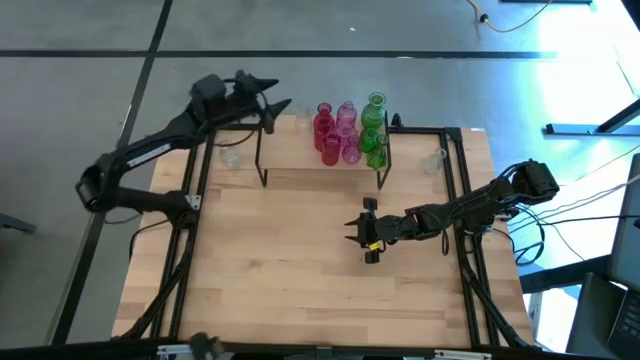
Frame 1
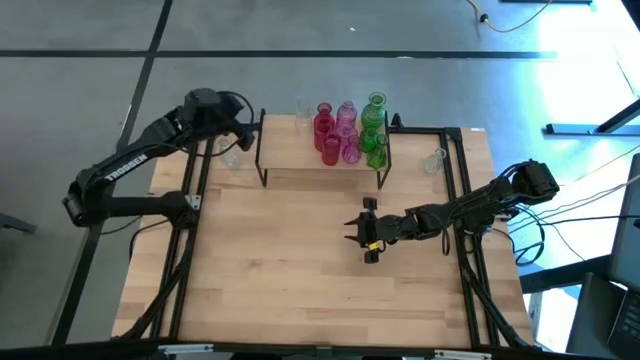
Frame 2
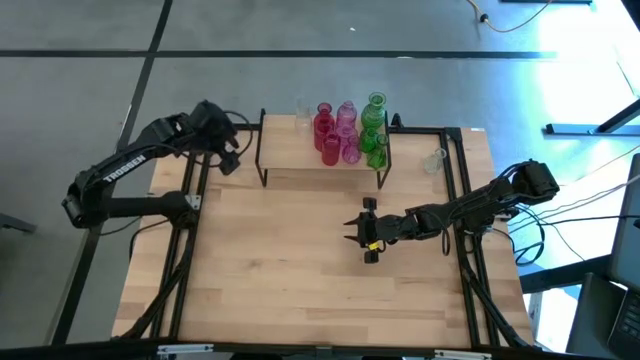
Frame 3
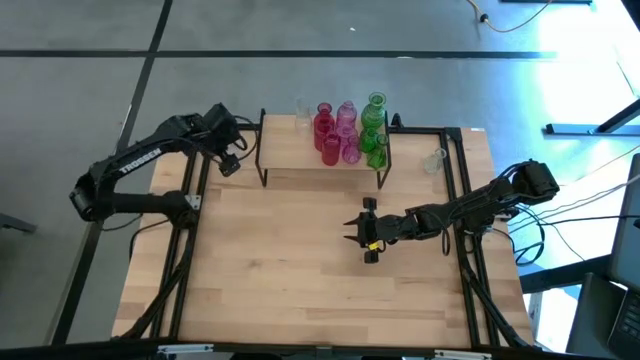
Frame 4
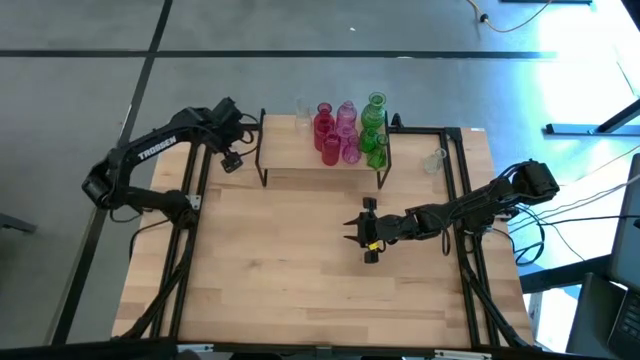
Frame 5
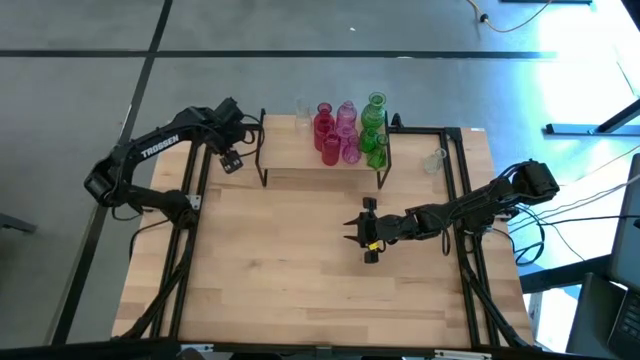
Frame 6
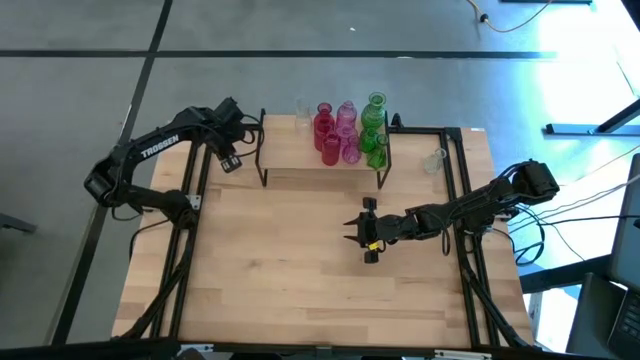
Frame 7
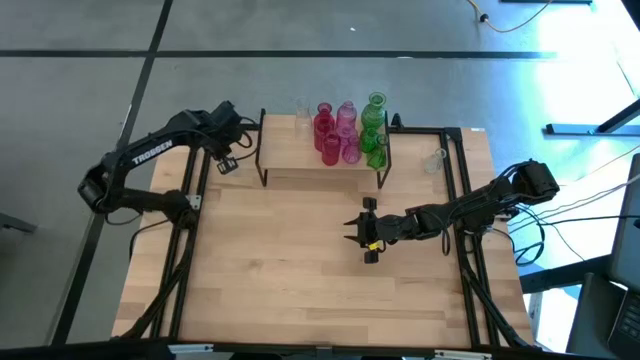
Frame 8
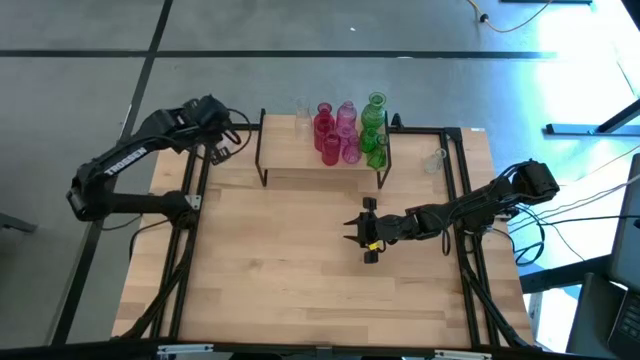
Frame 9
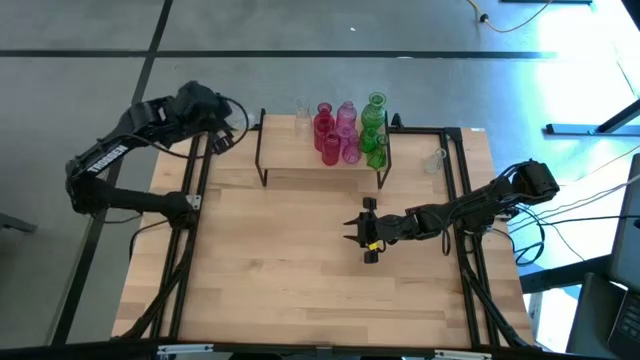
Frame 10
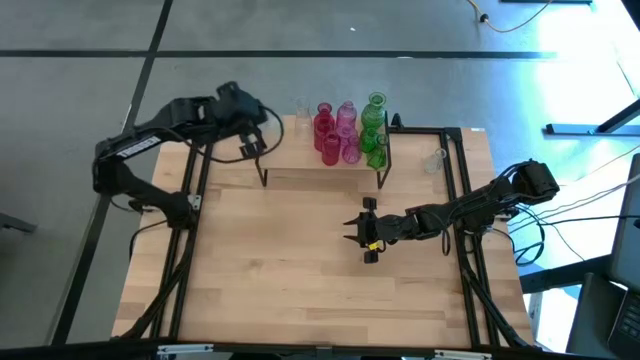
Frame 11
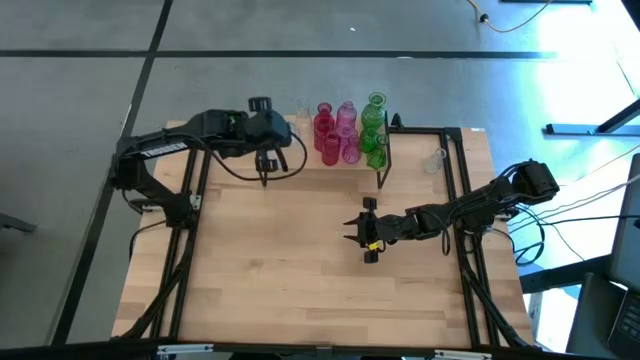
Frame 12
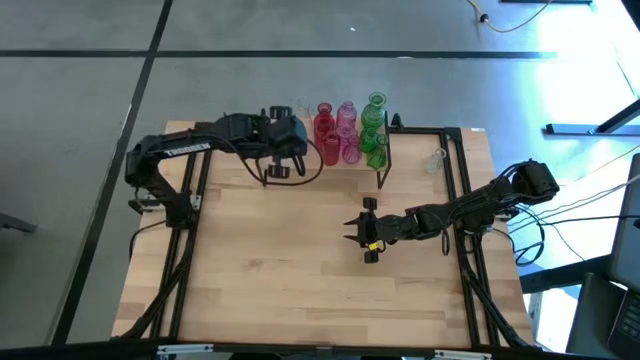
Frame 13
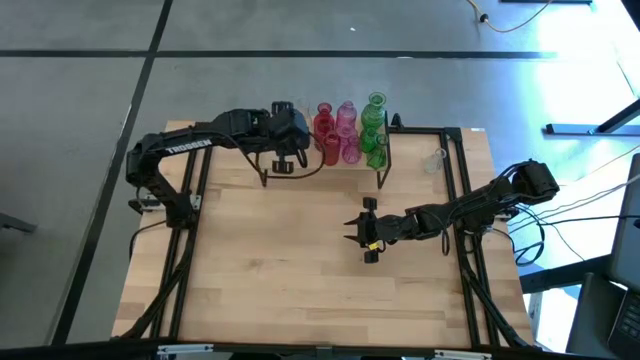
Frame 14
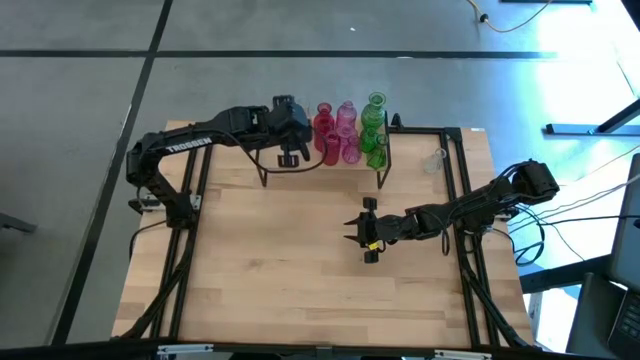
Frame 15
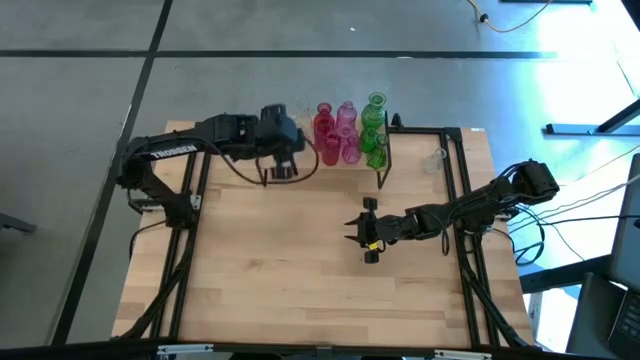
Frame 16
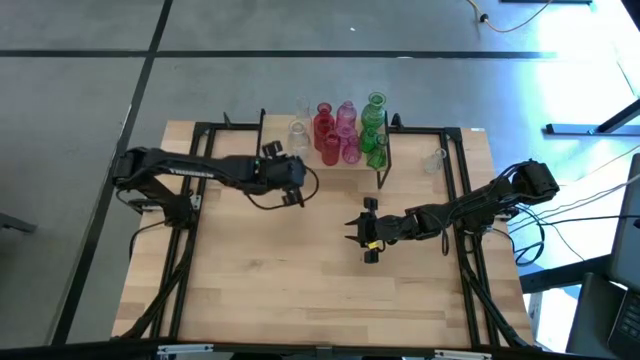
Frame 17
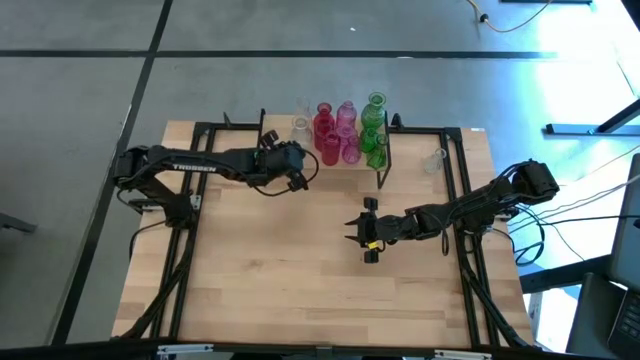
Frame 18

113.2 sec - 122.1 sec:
Task: sort vases onto shelf
Put the left transparent vase on the shelf aligned with the other transparent vase

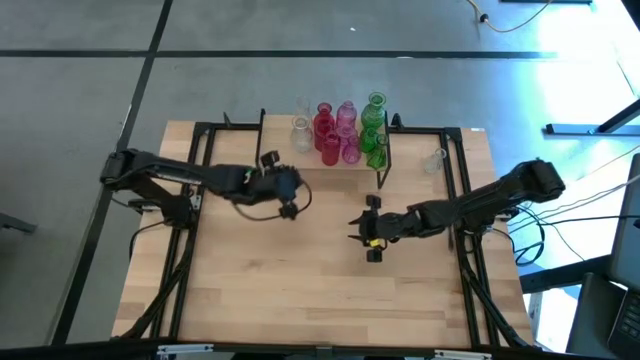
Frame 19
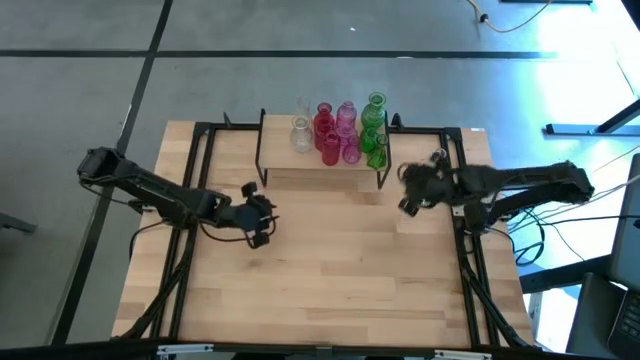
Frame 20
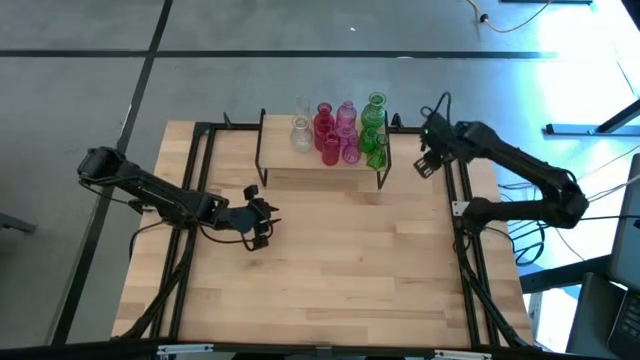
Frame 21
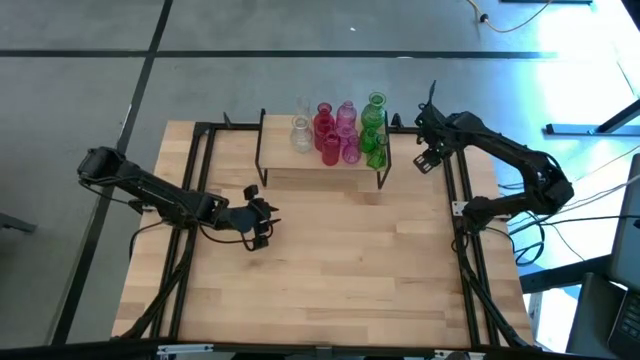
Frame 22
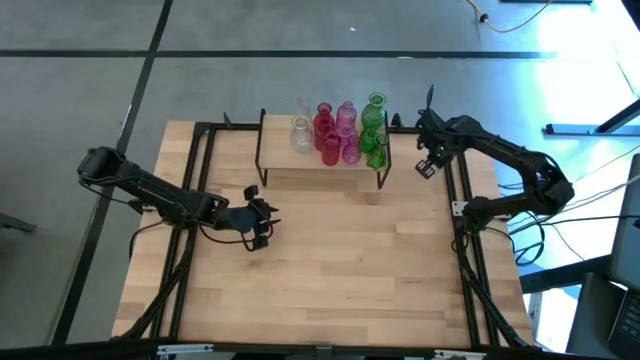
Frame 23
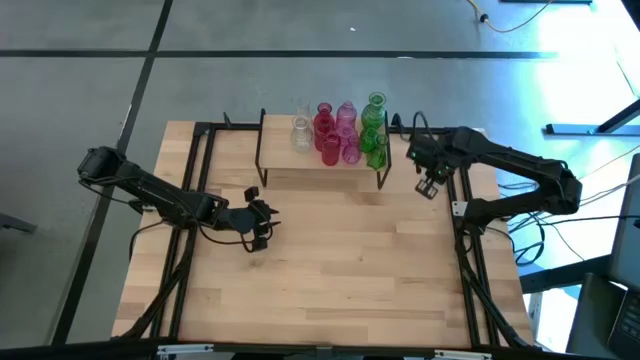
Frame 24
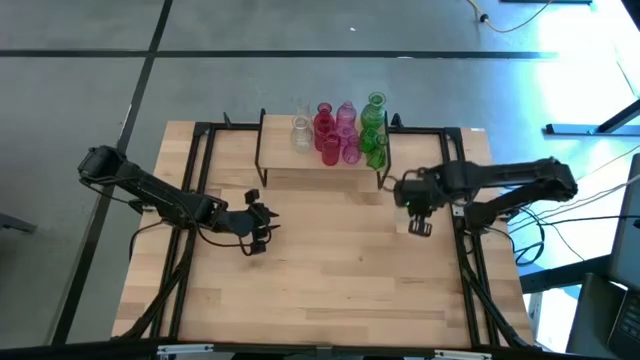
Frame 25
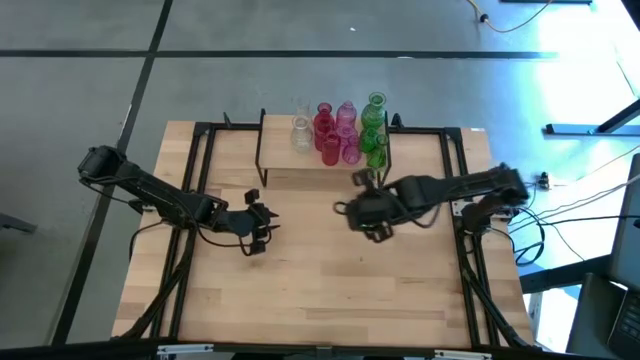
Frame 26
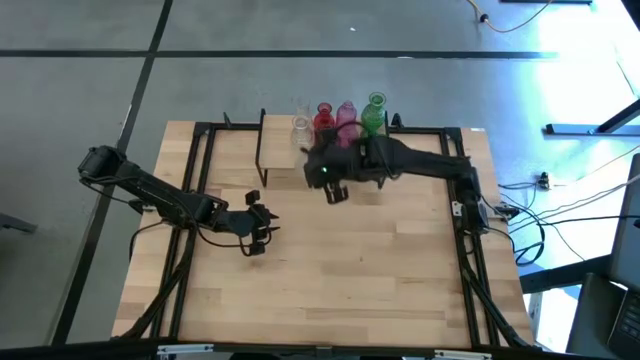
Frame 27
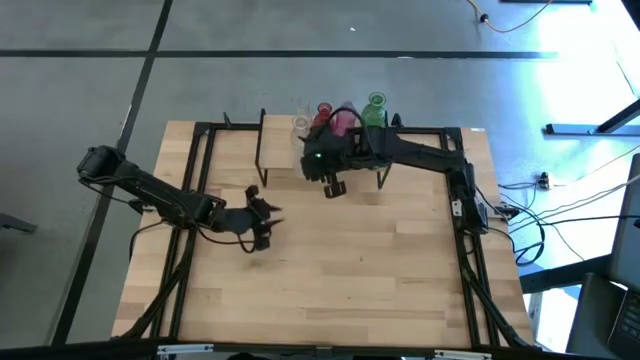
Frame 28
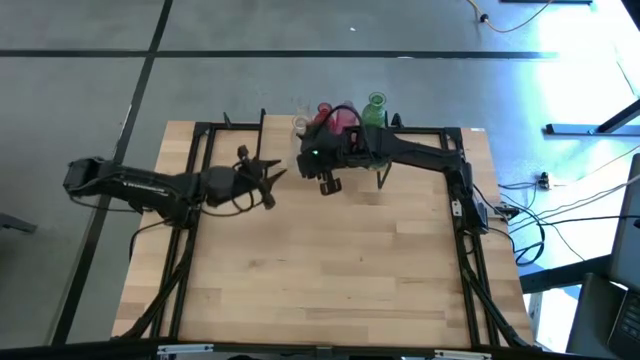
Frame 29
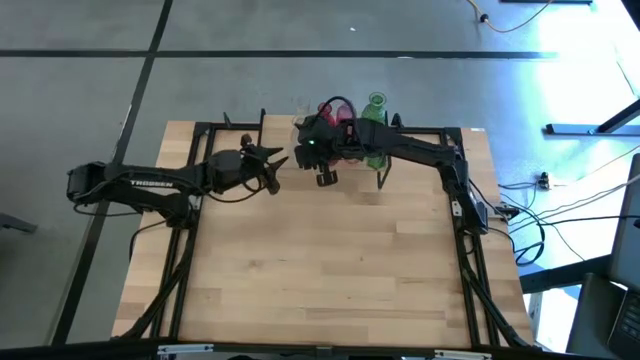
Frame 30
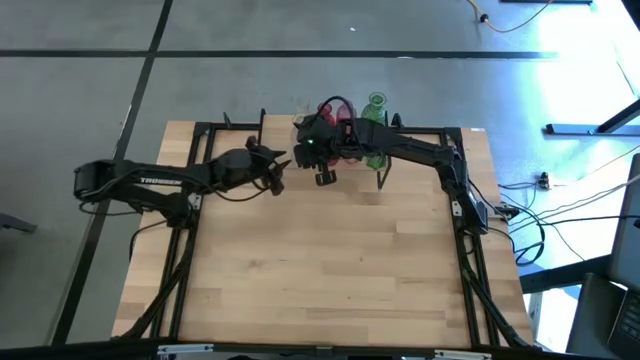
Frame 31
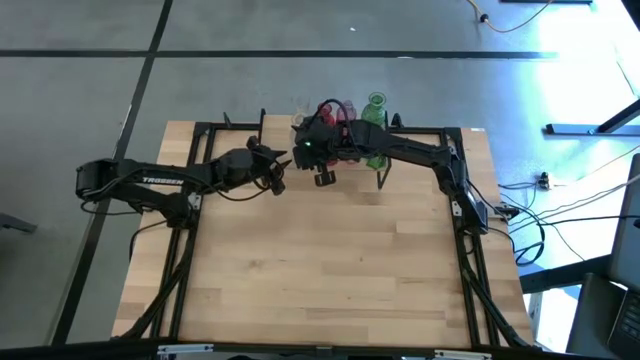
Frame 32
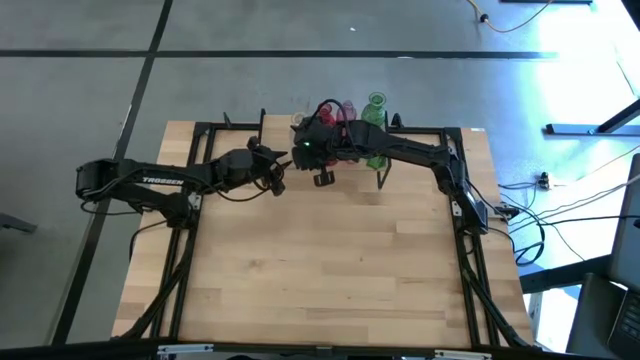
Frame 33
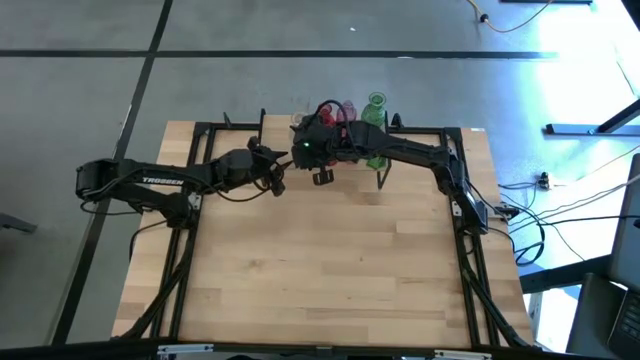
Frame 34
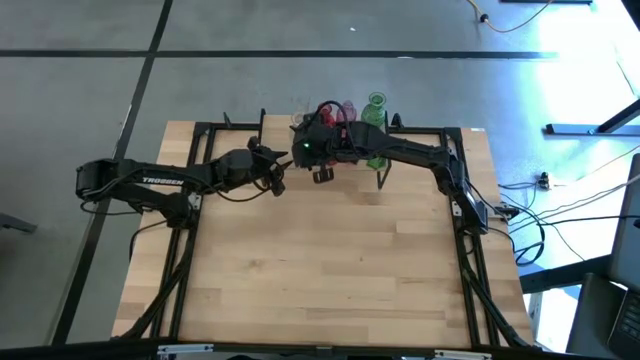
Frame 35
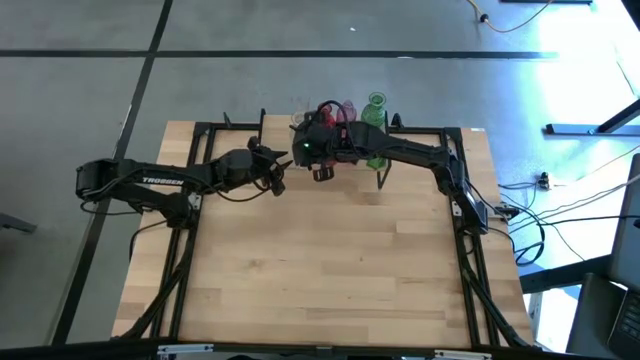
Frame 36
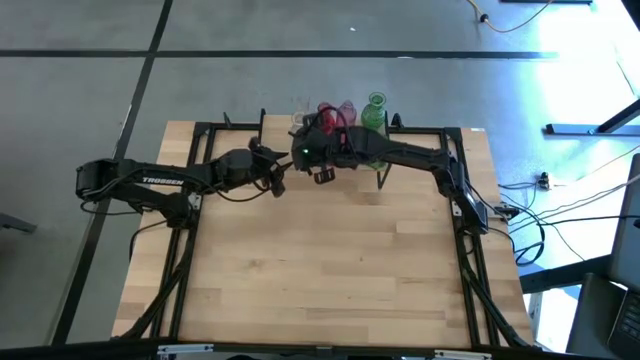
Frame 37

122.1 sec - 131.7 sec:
Put the transparent vase on the shelf aligned with the other transparent vases

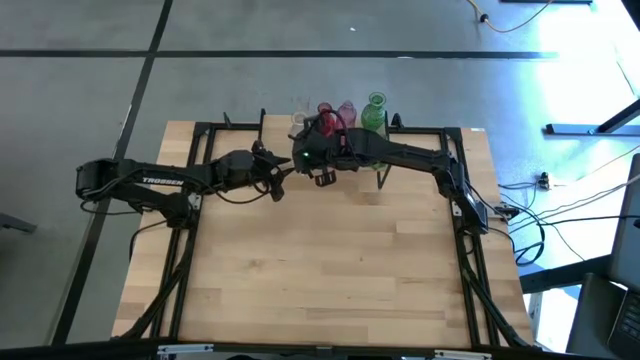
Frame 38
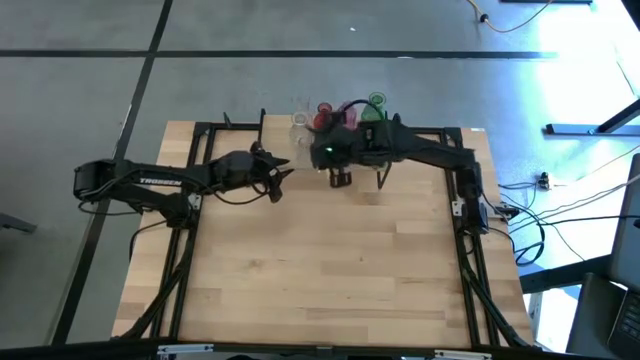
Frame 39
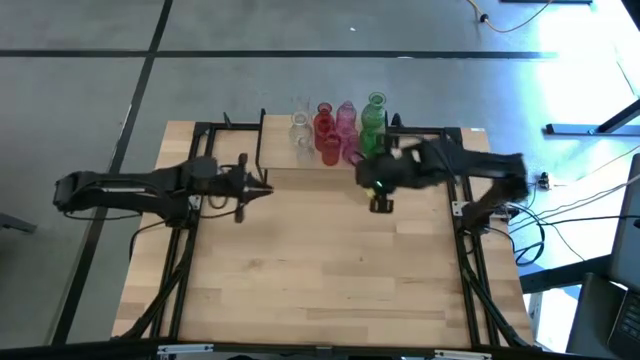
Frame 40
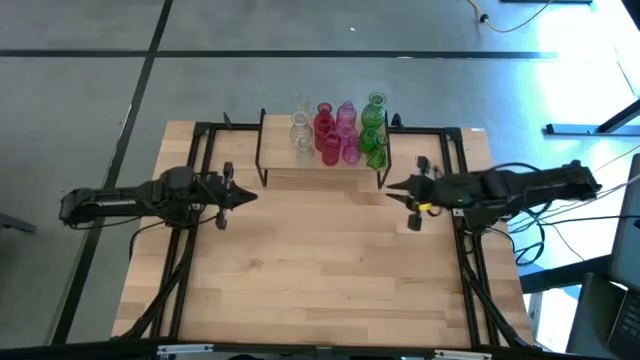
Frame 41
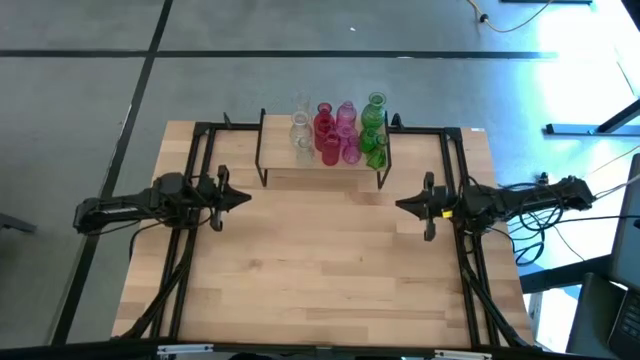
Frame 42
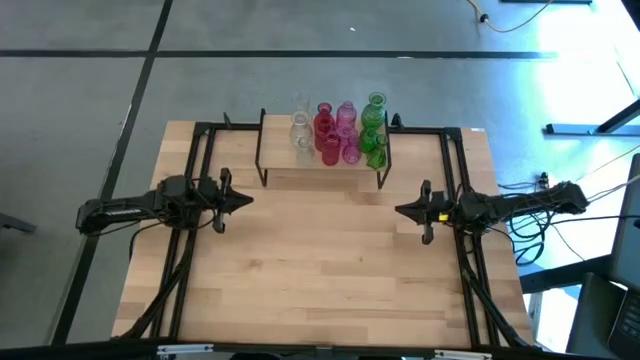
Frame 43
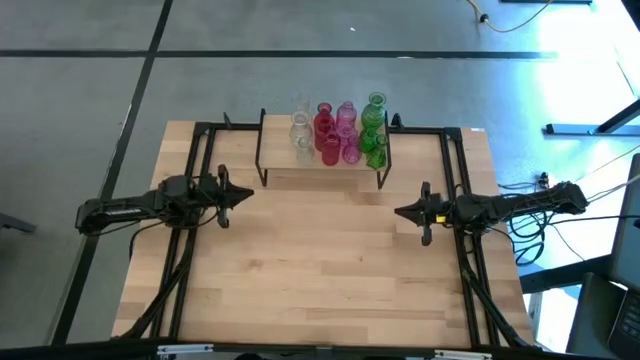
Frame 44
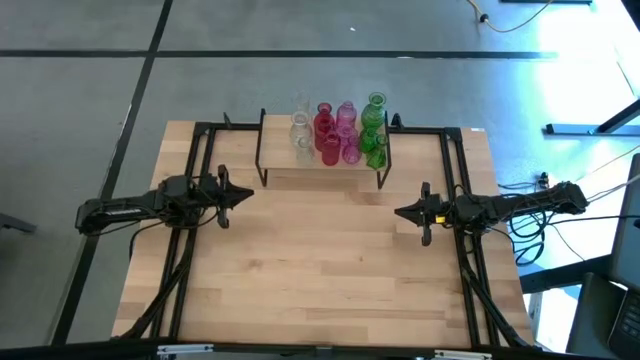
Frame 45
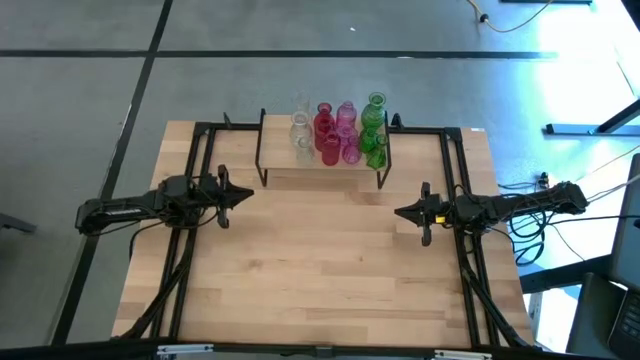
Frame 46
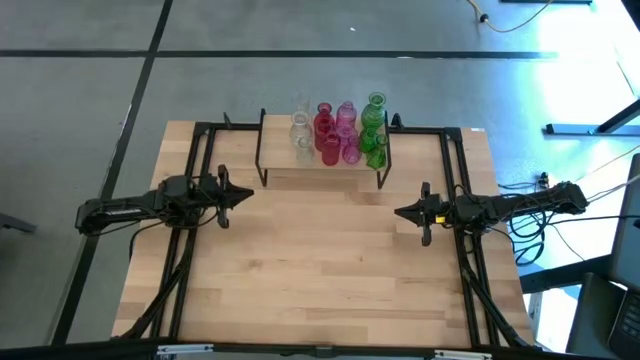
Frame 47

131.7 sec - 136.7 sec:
Return to Home Position
